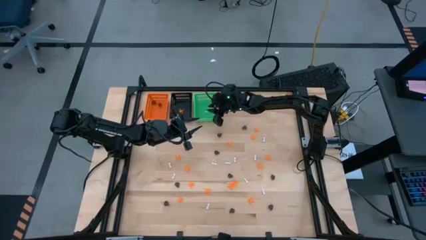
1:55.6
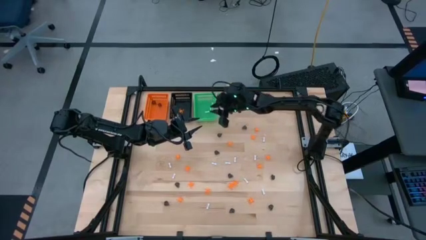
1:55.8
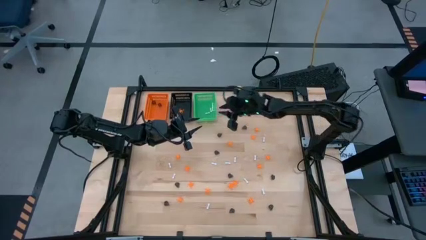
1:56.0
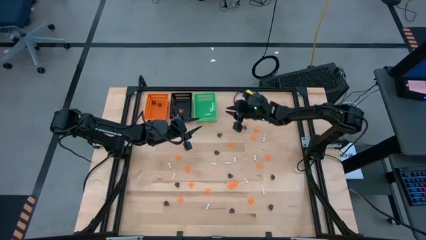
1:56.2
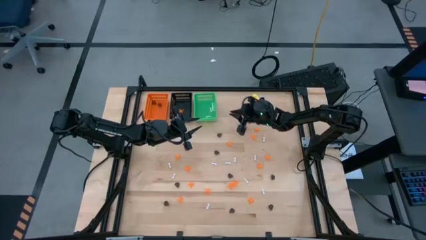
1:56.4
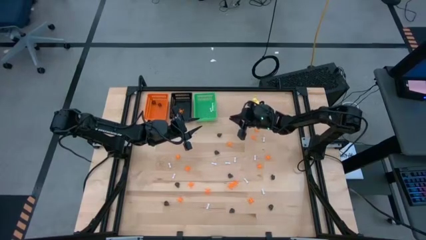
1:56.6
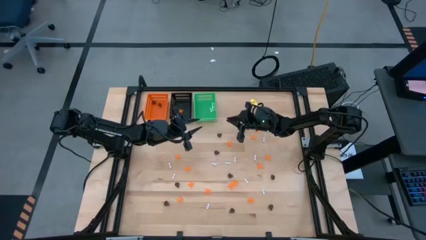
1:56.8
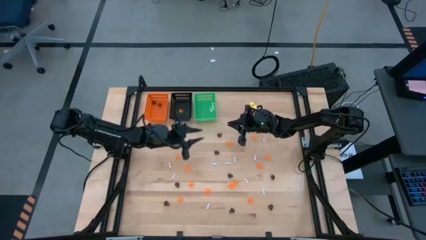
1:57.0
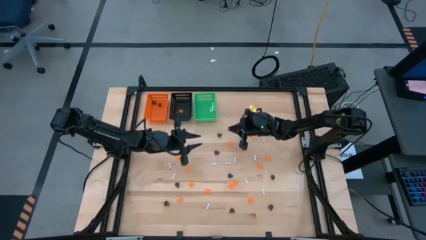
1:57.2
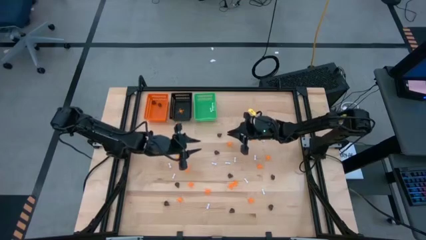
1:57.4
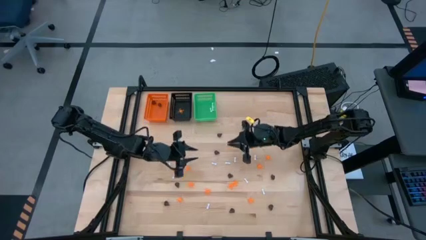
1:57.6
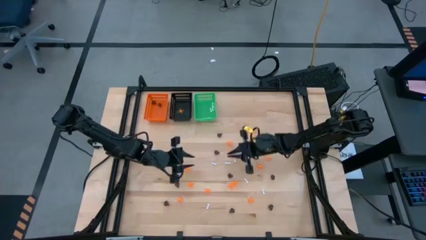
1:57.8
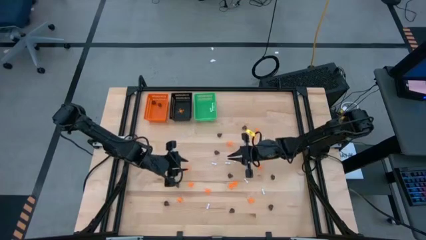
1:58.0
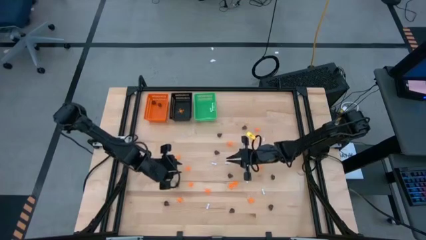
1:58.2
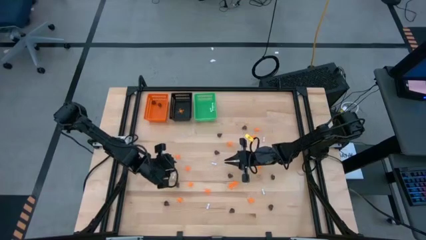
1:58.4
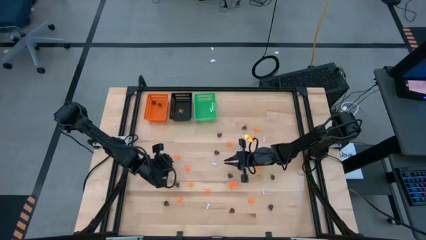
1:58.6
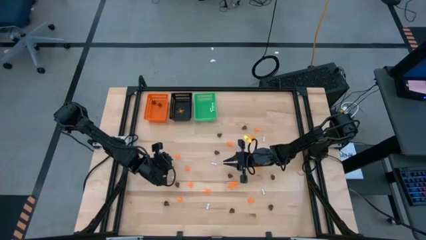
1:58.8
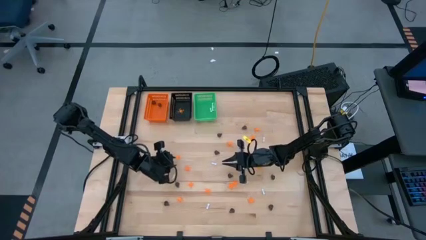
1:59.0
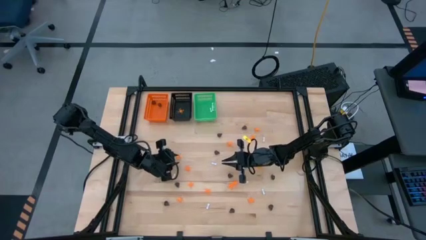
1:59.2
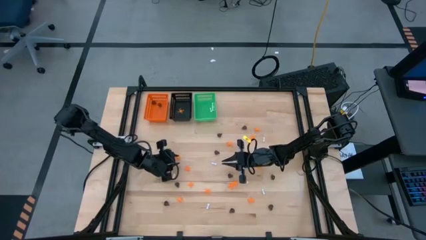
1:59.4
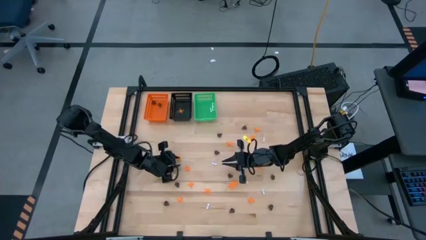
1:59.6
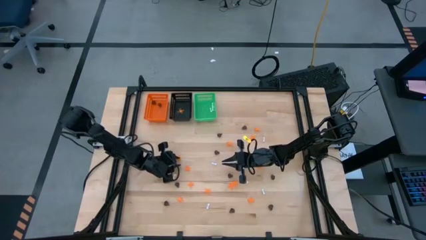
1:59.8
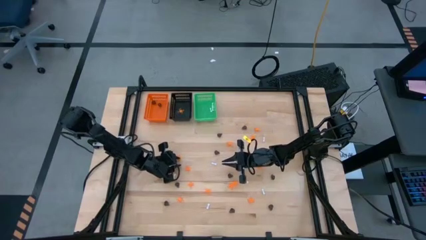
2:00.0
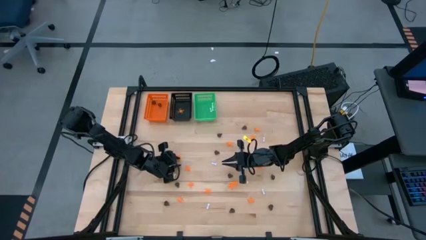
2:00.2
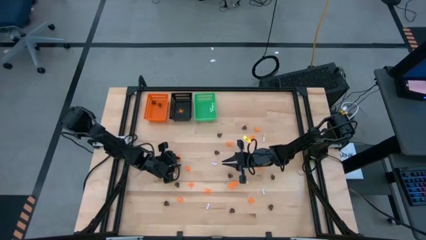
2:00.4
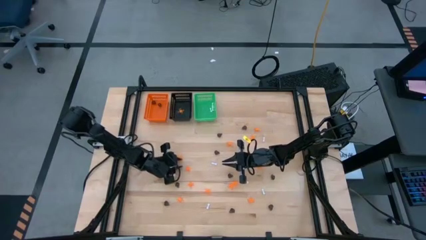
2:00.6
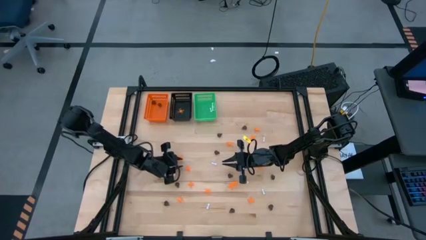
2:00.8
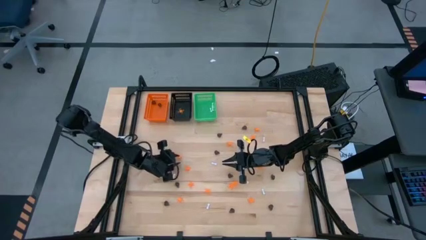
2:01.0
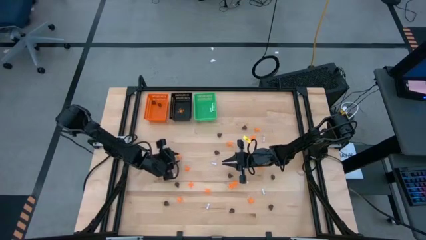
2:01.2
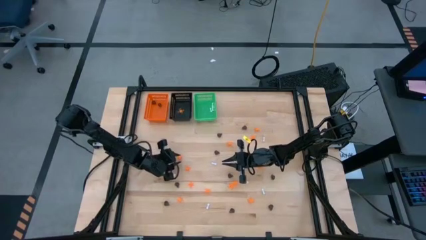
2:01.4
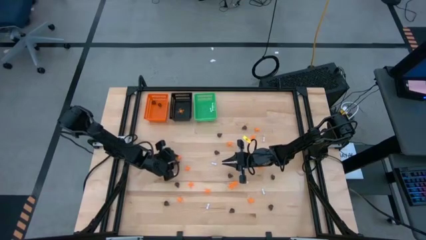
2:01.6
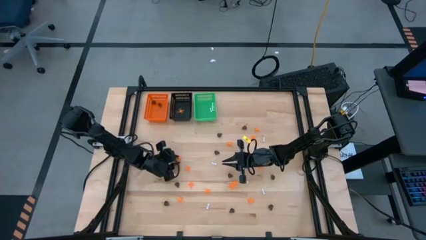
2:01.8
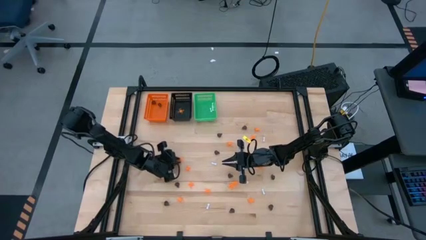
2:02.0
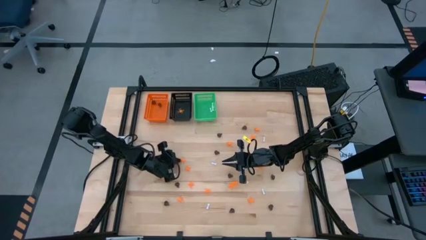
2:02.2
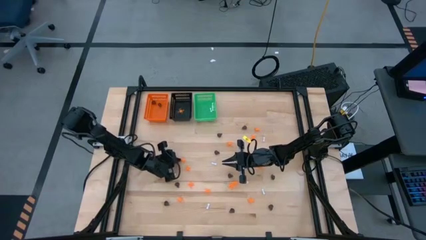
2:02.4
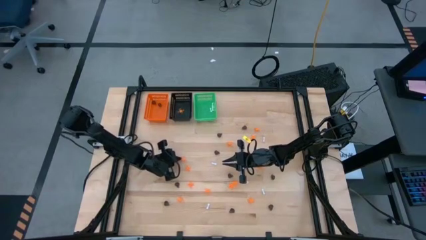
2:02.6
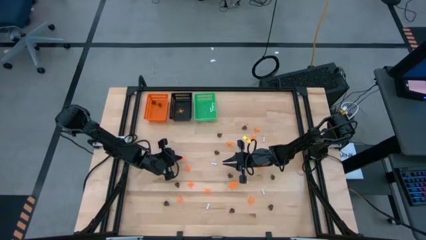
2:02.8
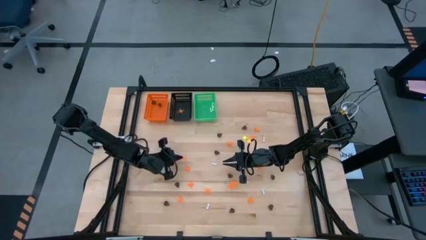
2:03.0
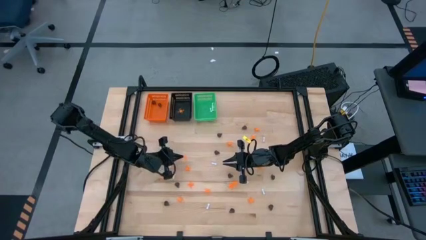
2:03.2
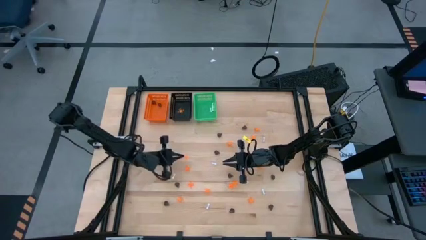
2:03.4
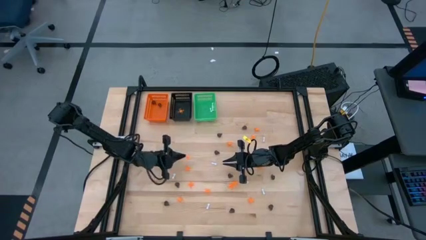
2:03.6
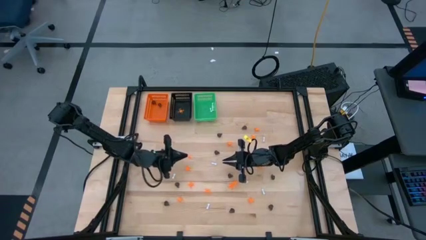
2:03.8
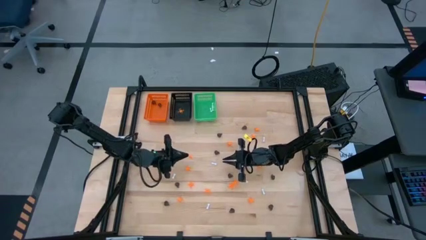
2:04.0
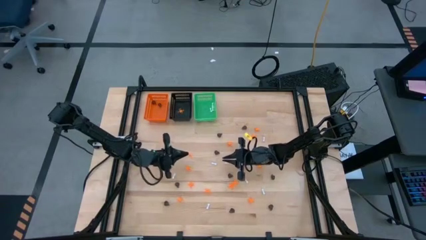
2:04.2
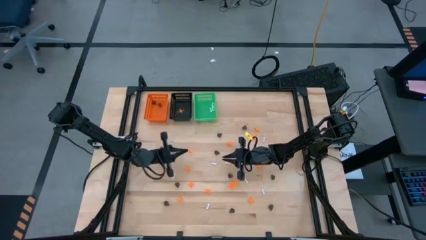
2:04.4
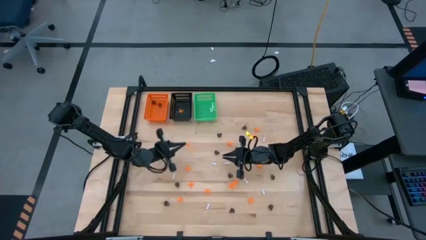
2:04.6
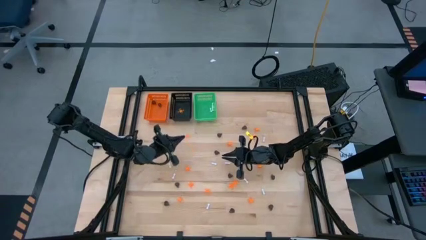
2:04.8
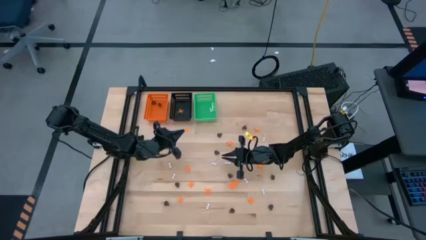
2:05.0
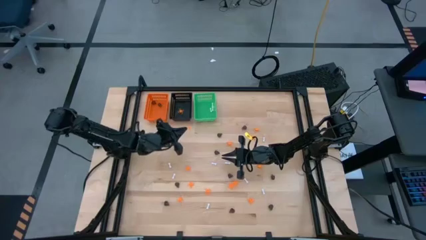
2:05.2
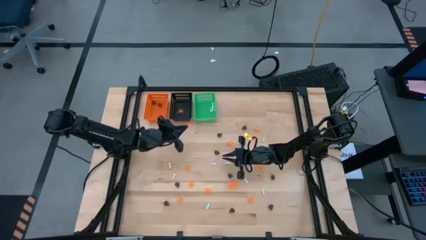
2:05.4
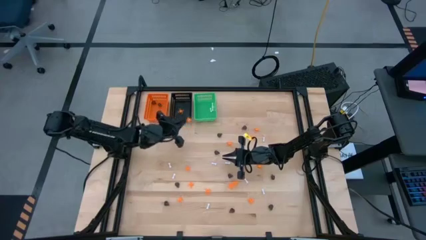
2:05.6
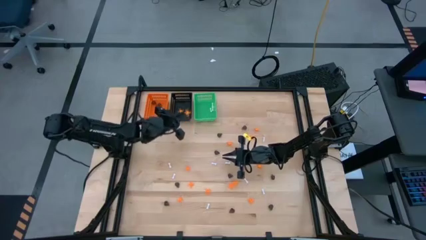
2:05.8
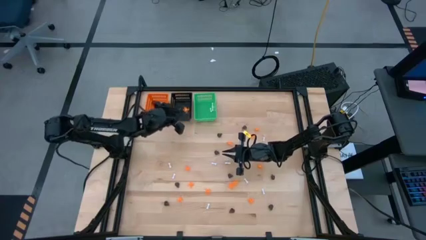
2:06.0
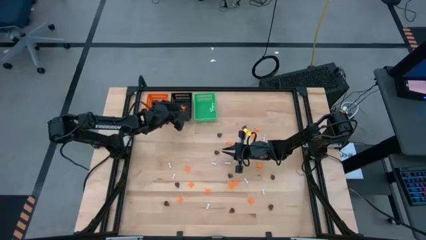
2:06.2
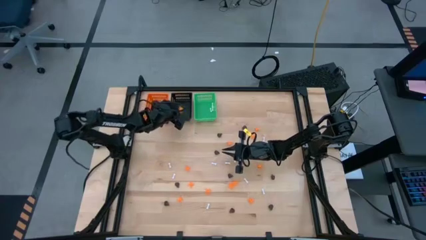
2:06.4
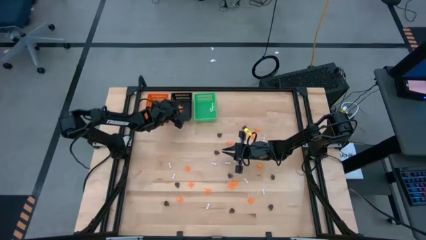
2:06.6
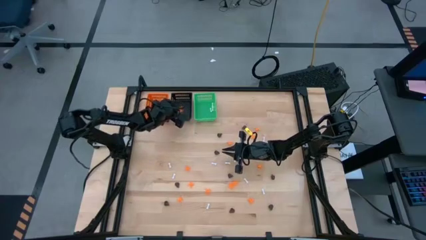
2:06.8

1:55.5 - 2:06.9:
Task: Sort Halloween decoration
Put the orange spider toy into the black bin

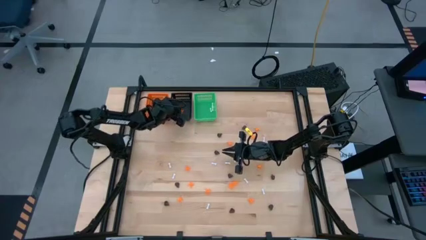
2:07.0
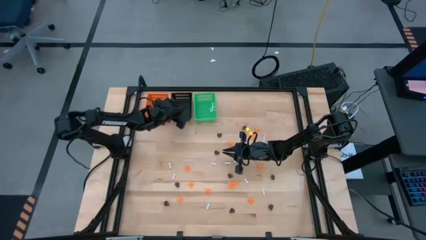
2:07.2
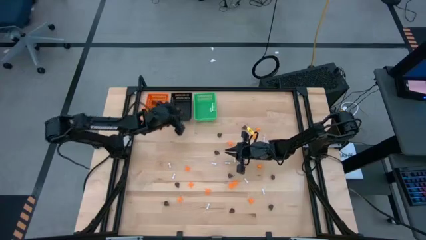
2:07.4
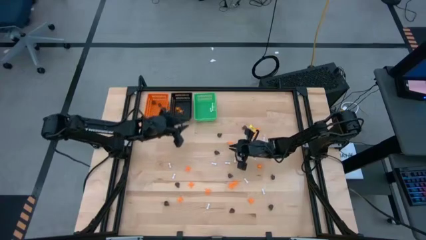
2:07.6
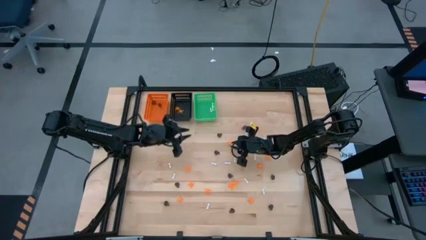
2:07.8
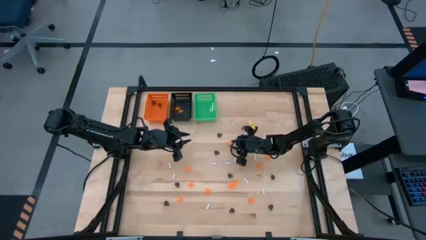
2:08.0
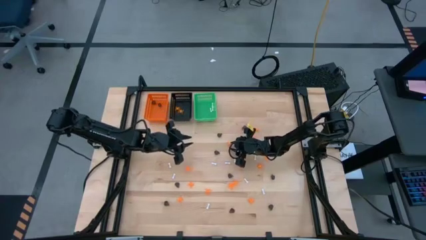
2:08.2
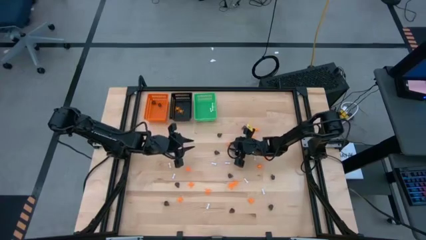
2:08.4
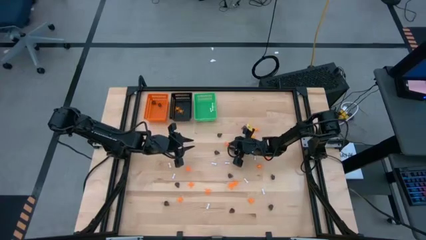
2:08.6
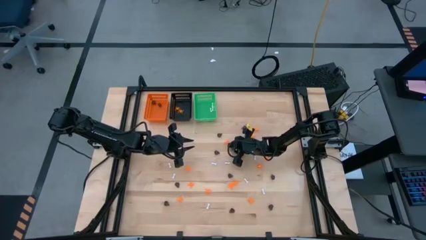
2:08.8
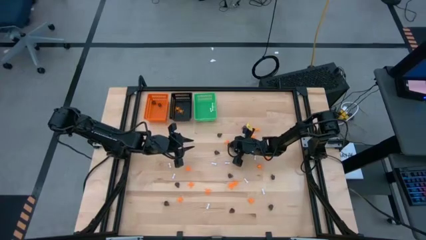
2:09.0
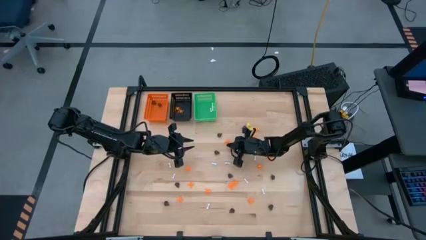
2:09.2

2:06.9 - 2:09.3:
Put the orange spider toy into the black bin

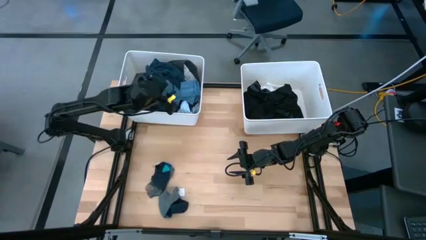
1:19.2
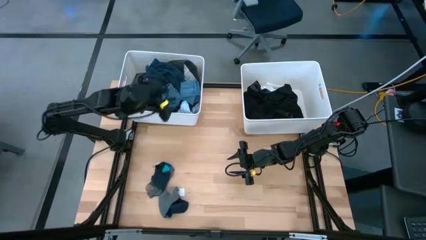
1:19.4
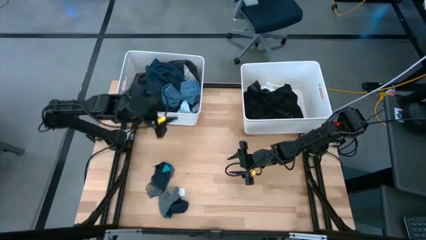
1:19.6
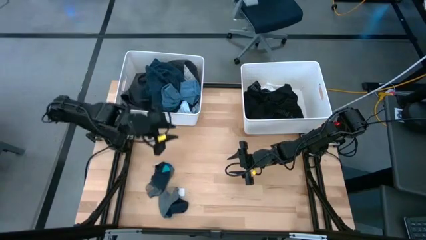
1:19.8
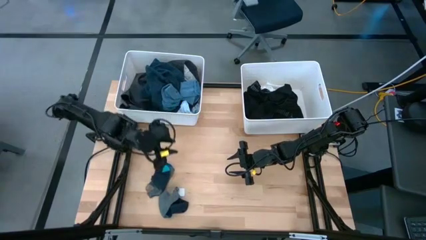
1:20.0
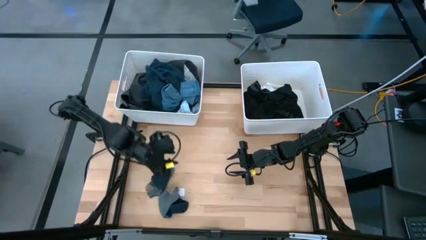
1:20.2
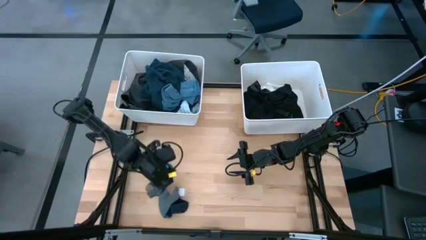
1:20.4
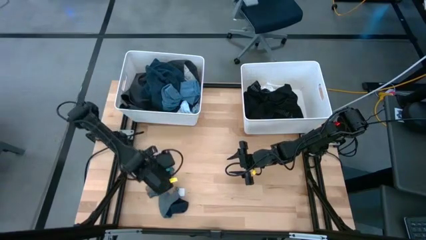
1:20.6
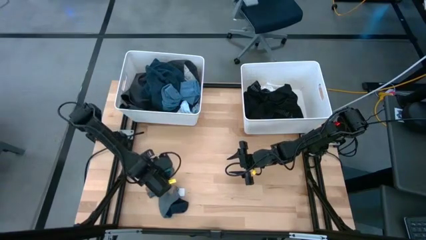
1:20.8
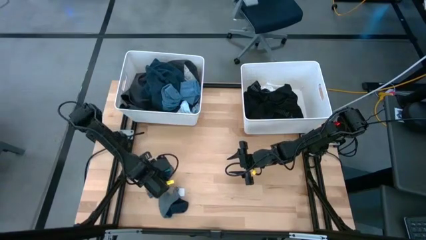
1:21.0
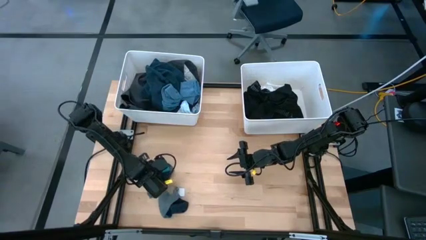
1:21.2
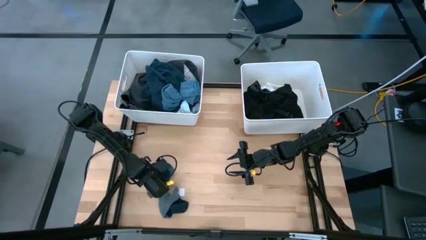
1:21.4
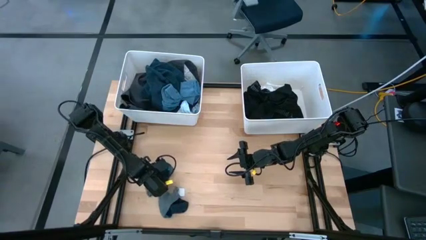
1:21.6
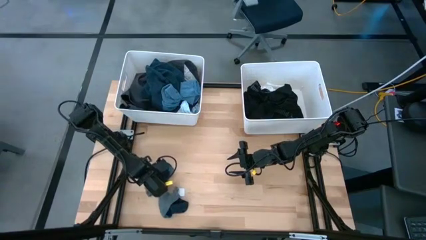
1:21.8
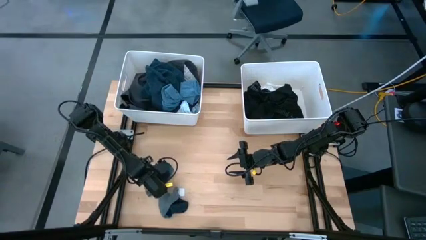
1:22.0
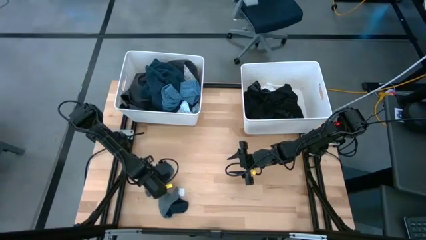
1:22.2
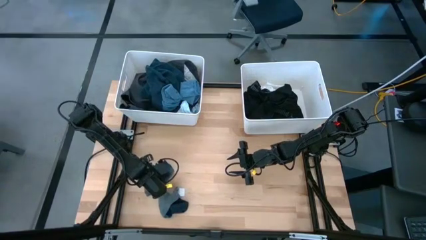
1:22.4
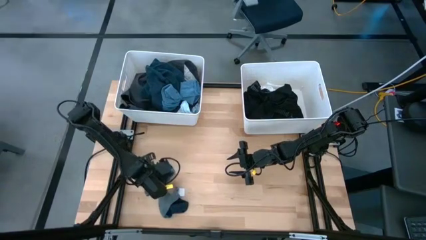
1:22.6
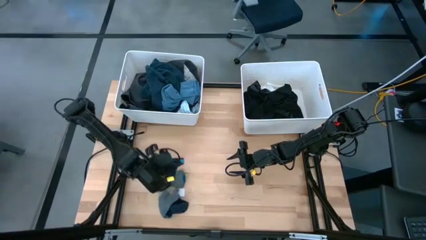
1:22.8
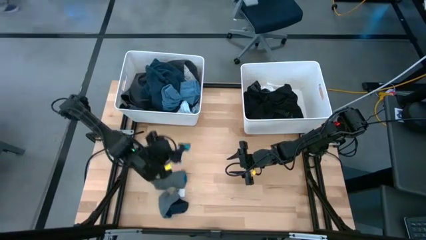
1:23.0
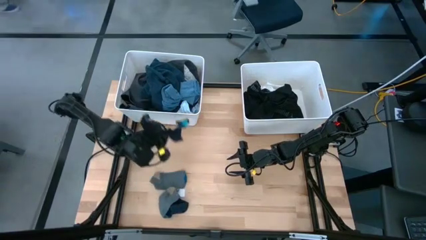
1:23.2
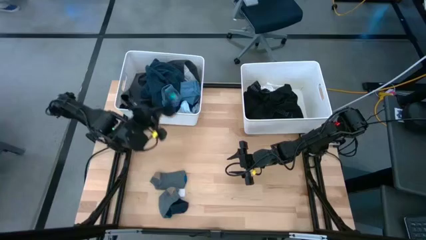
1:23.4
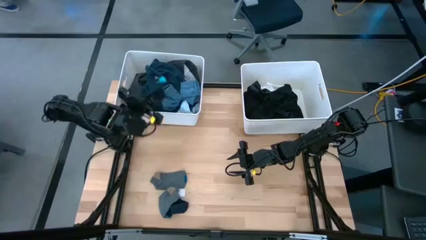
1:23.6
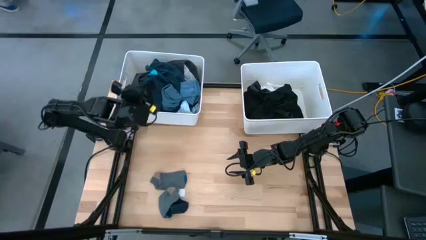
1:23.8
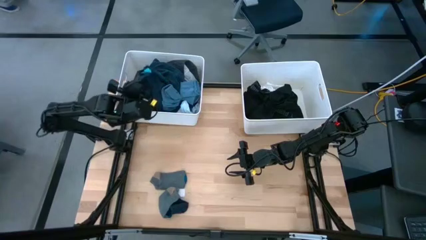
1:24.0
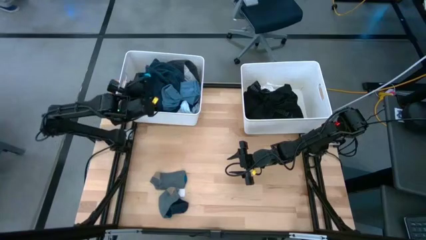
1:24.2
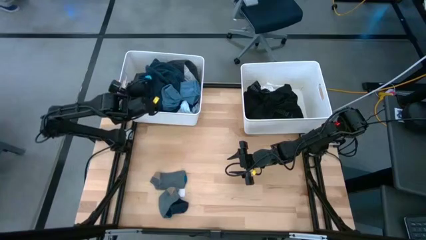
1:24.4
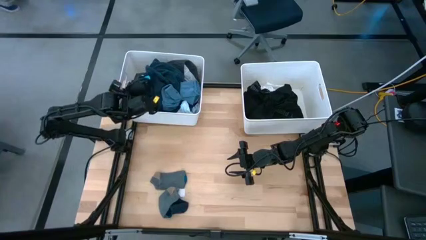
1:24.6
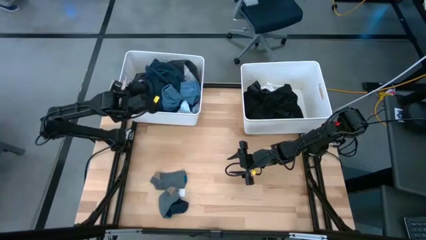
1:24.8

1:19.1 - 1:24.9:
Task: Sort clothes
Put the top dark blue sock into the left white laundry bin
